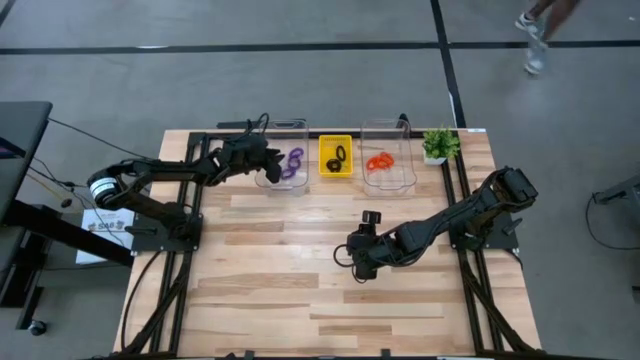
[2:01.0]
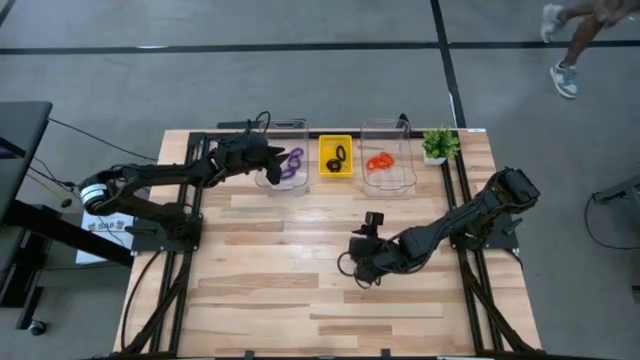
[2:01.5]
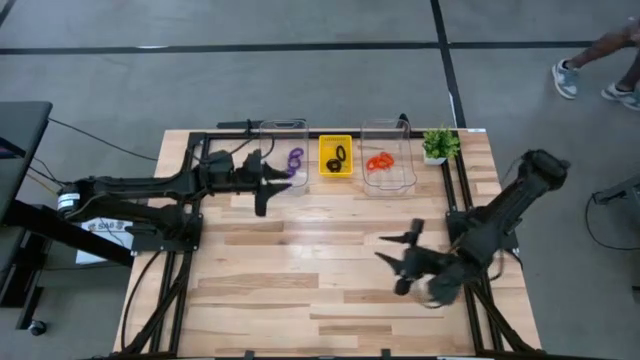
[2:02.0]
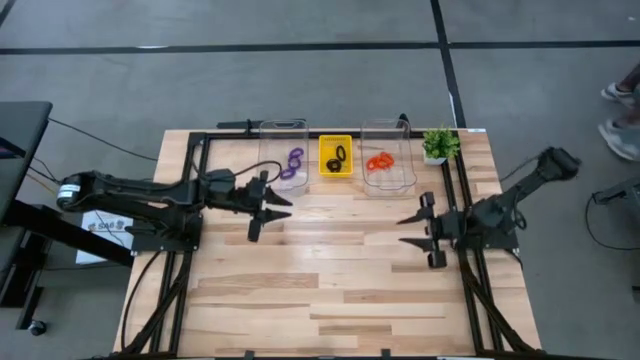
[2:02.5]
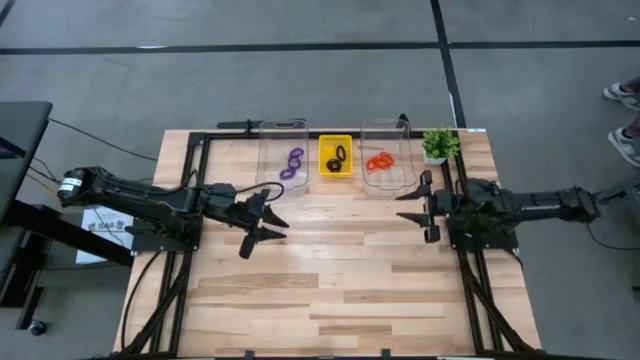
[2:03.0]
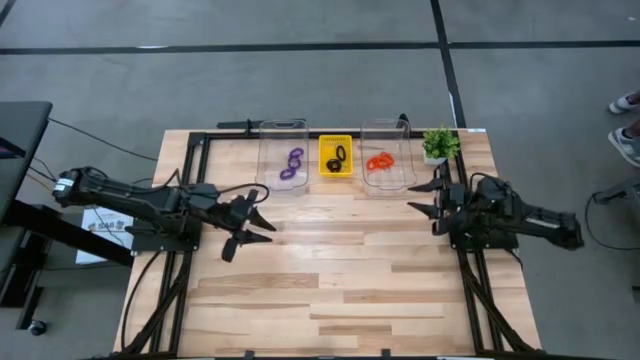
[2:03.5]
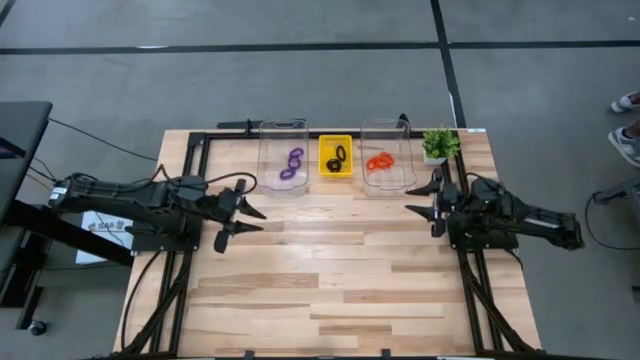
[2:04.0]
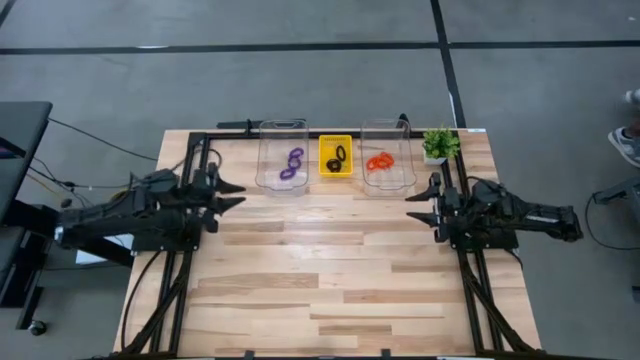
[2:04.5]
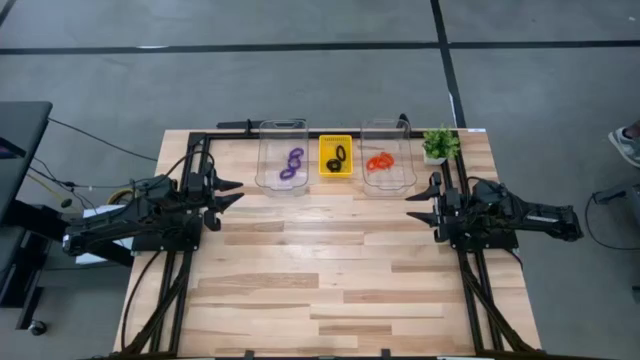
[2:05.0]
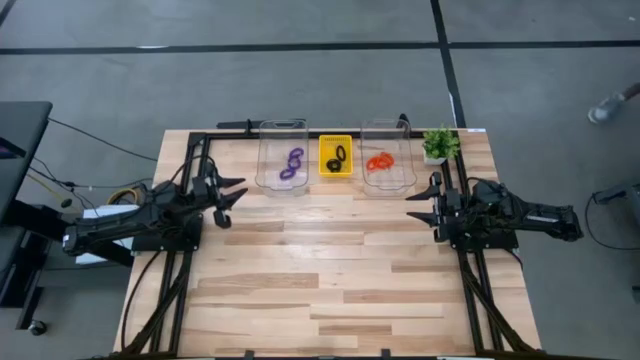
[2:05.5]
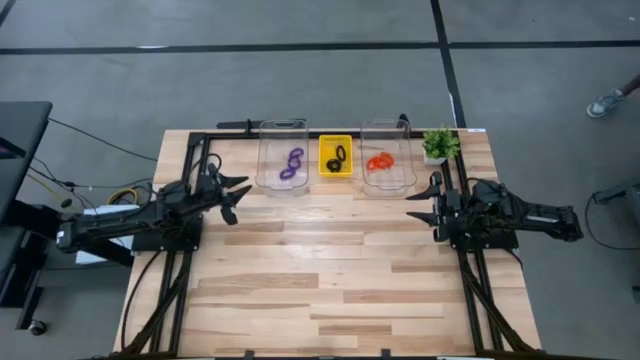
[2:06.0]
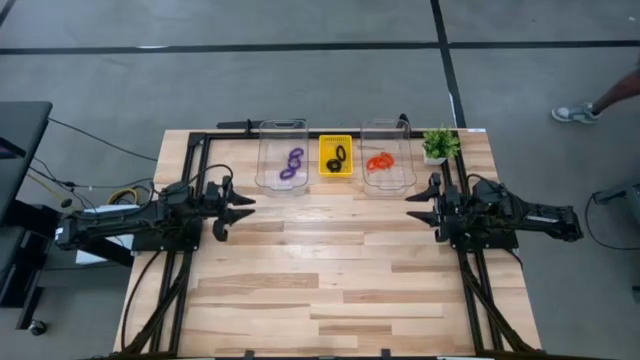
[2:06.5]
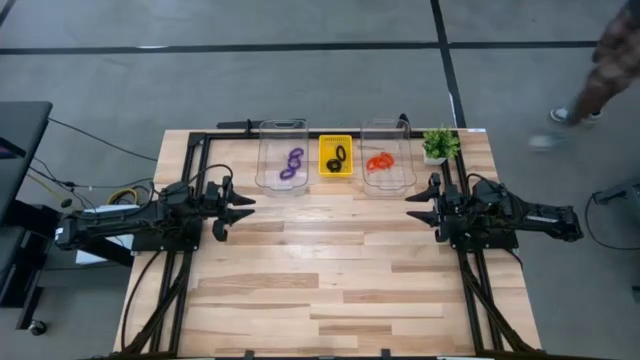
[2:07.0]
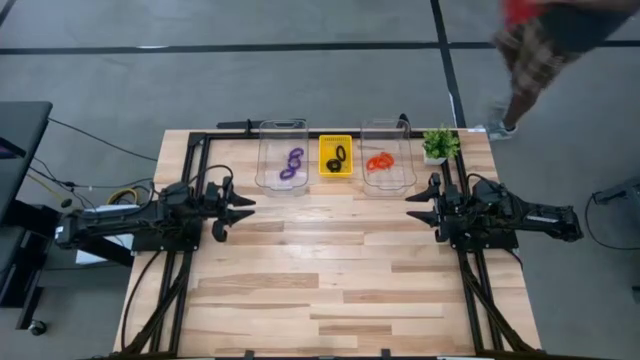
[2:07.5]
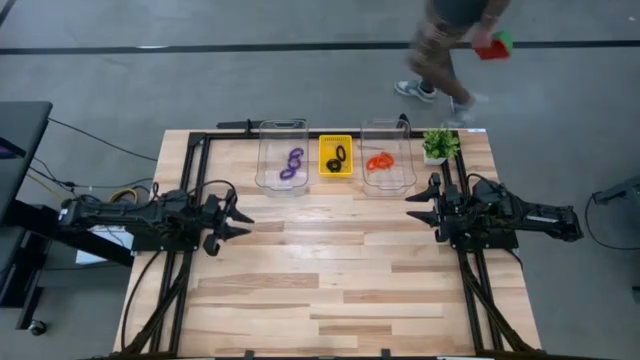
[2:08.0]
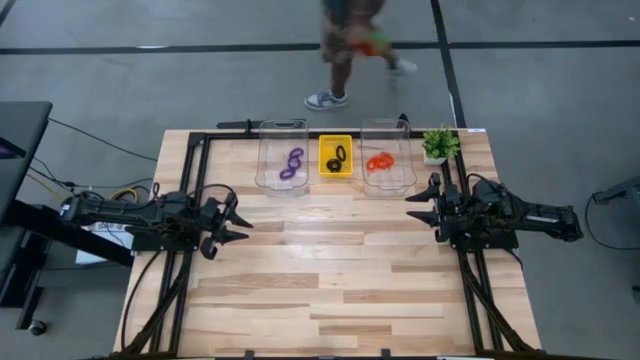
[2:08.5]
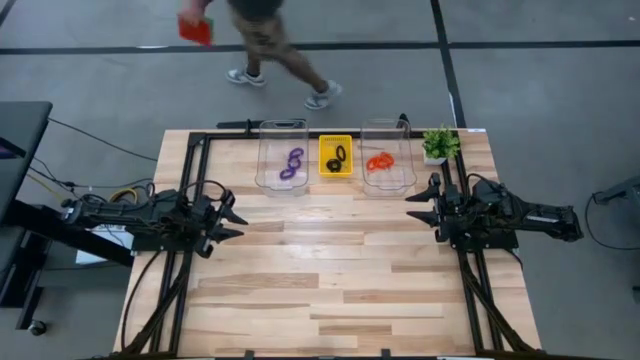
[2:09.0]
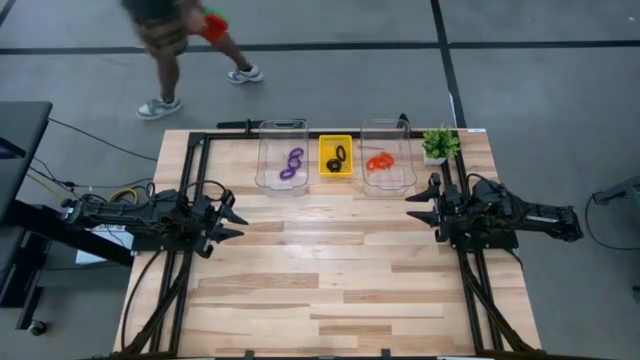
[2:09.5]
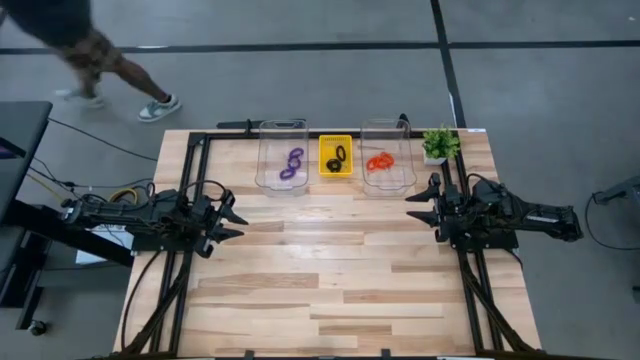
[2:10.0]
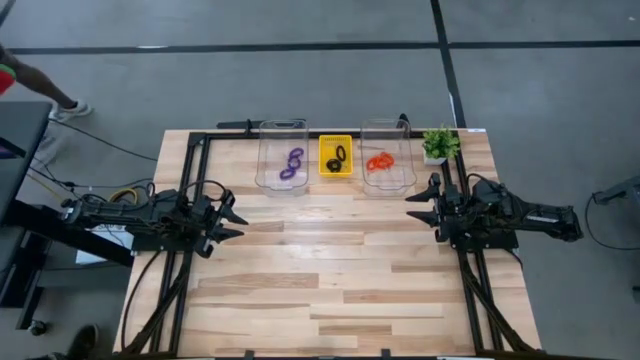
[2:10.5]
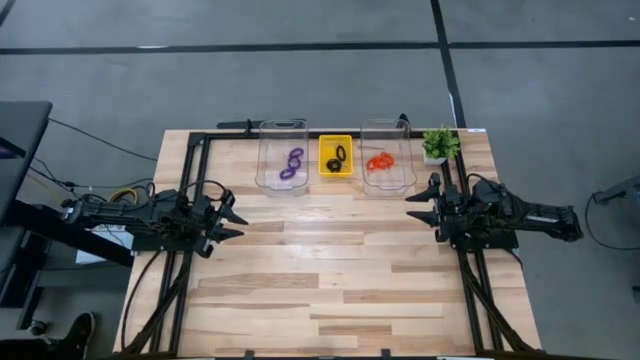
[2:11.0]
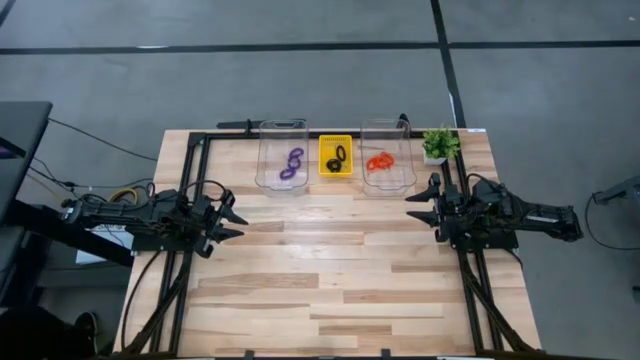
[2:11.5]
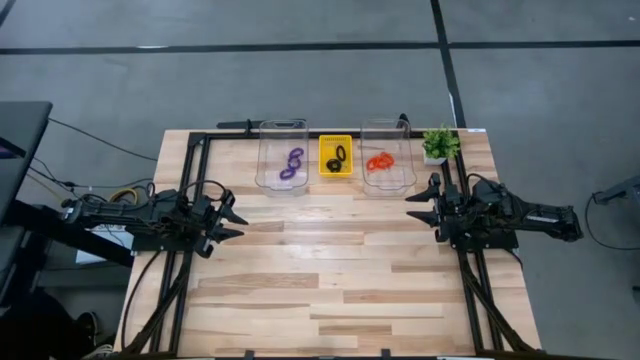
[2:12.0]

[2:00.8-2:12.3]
Task: Sort spring keychains
Return to Home Position

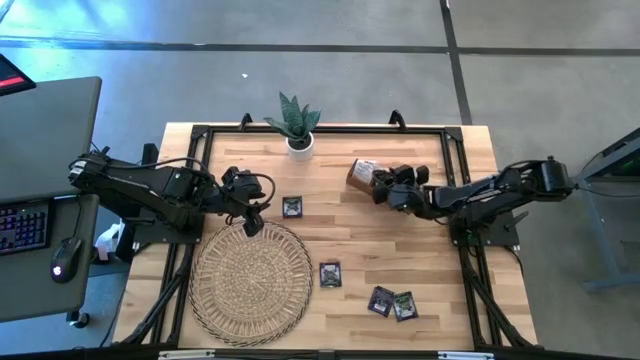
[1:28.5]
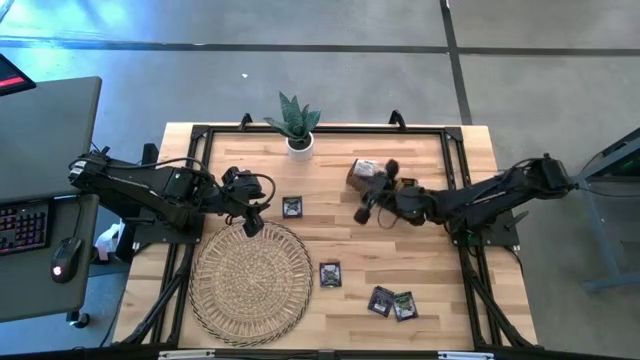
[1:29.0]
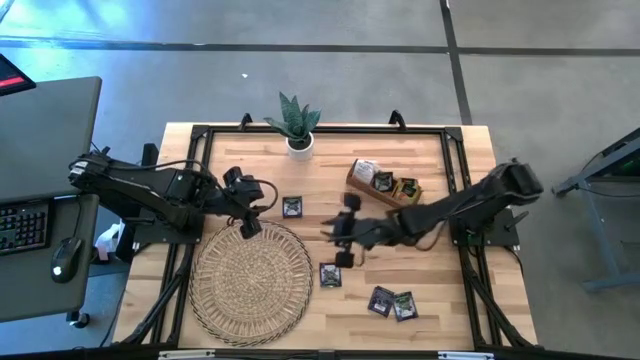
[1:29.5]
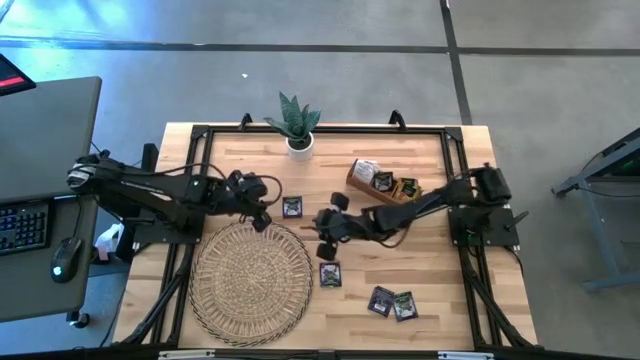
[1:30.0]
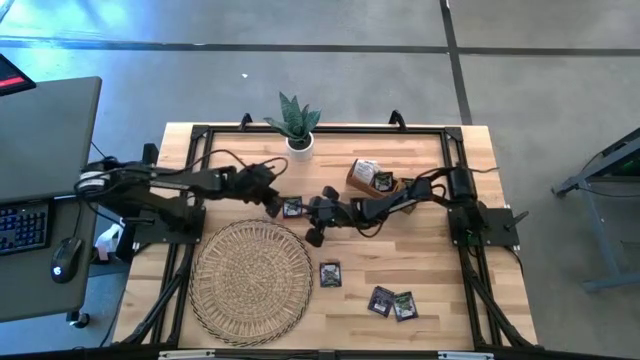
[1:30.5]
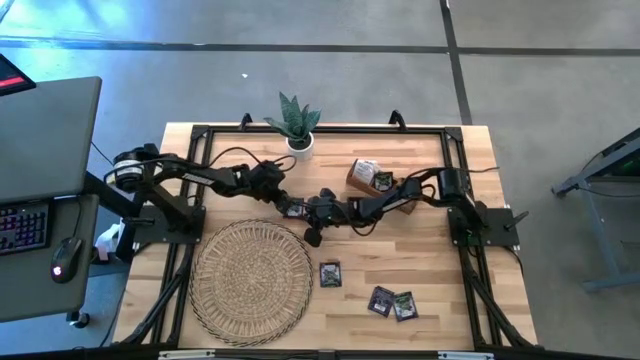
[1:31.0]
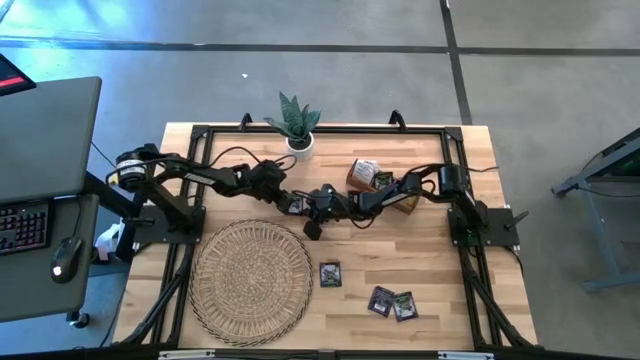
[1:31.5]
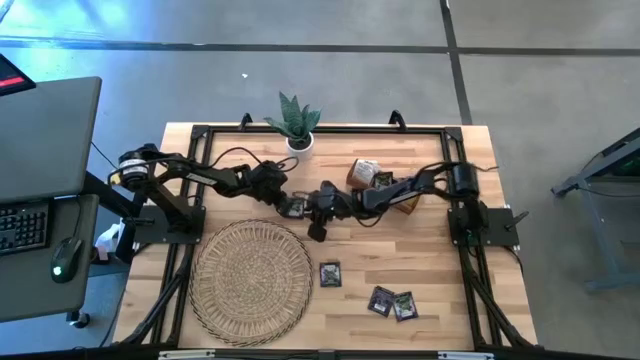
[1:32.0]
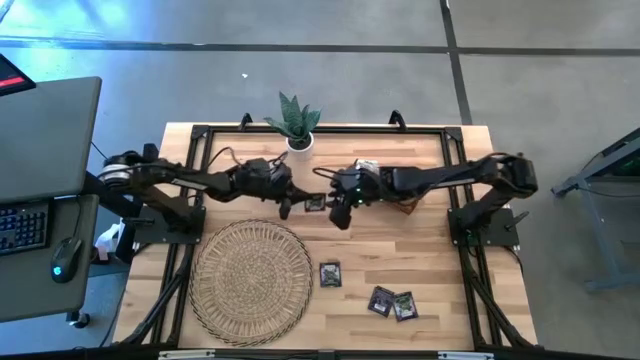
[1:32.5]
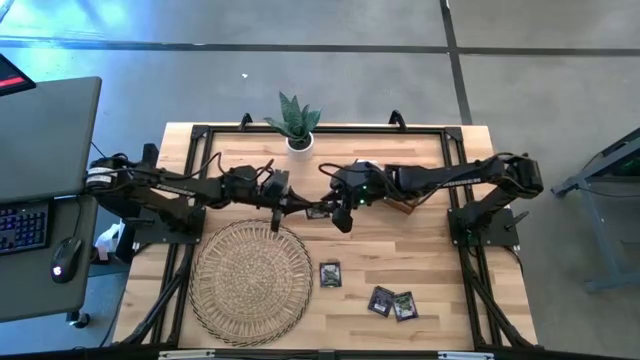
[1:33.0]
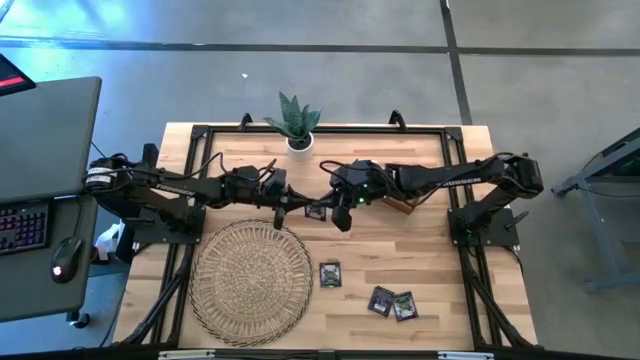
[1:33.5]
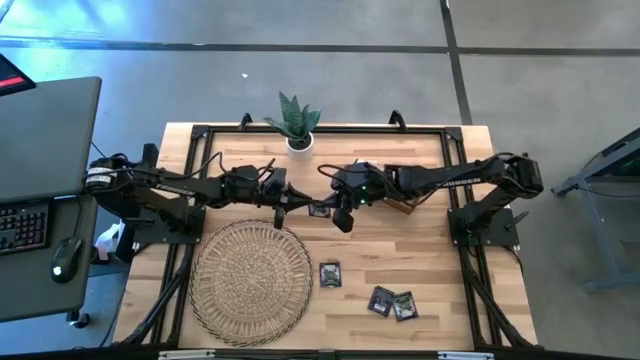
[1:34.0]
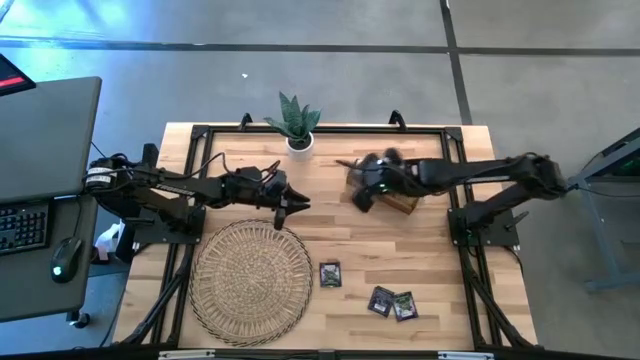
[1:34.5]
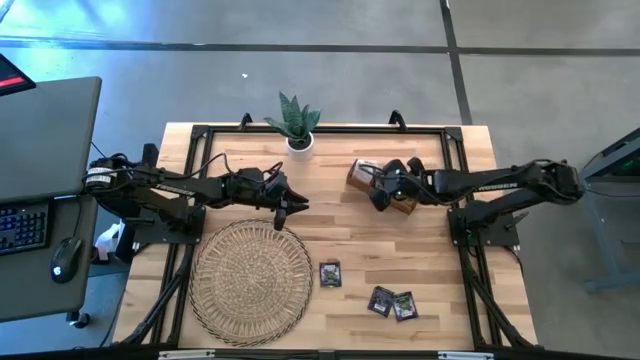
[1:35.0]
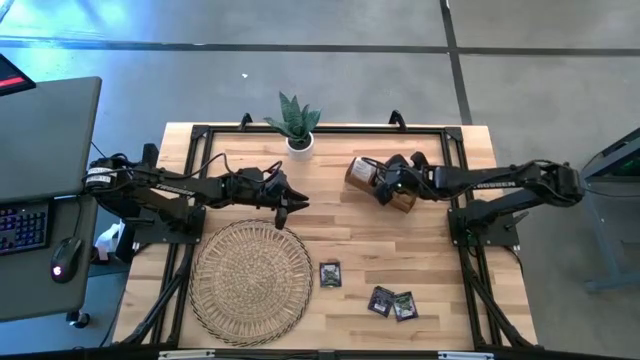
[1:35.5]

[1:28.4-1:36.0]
Task: Pick & Place Tea
Put the black tea bag into the middle section of the wooden organizer

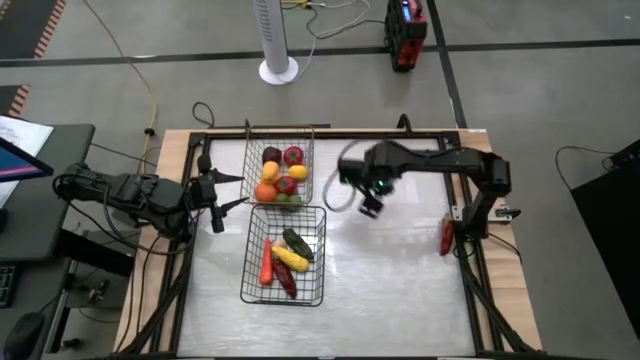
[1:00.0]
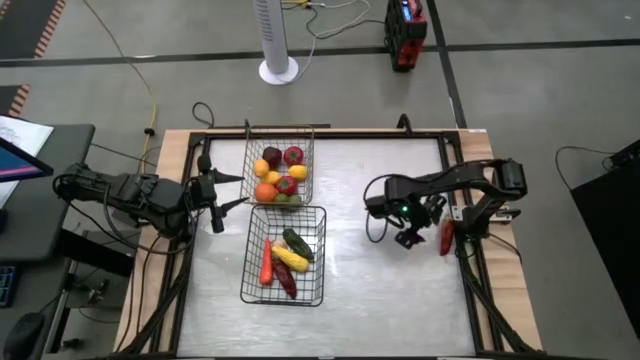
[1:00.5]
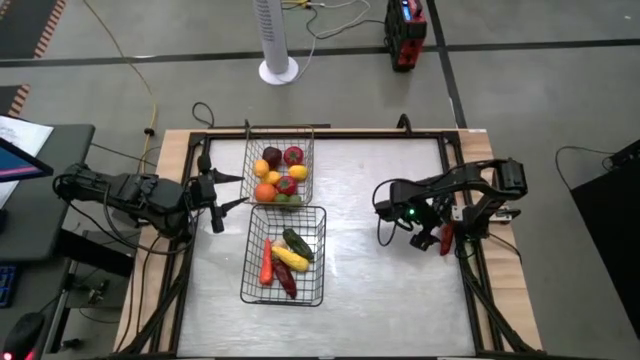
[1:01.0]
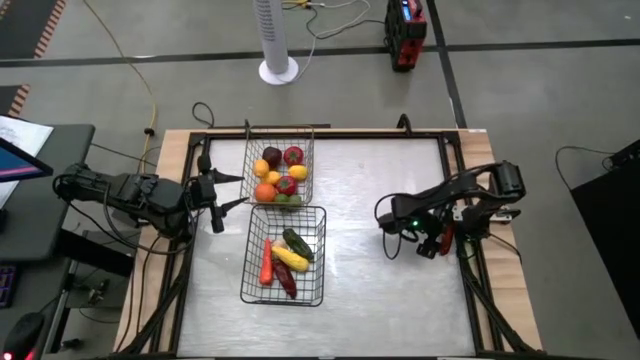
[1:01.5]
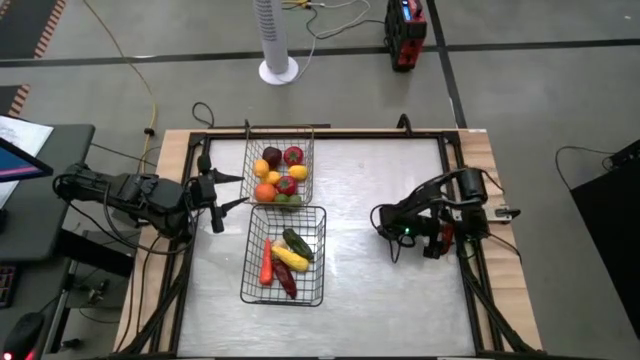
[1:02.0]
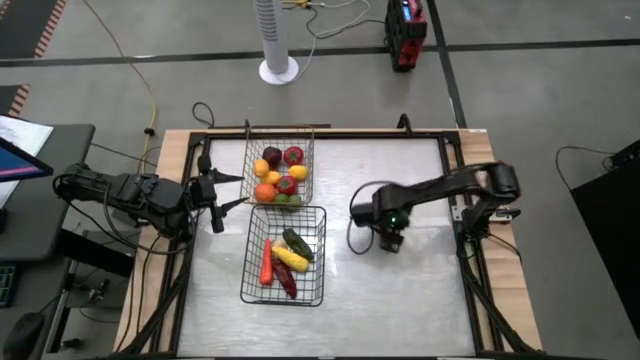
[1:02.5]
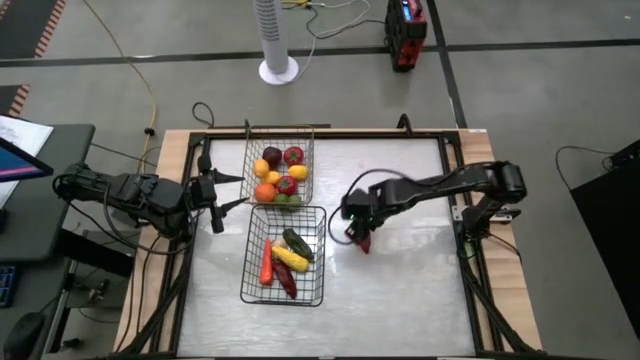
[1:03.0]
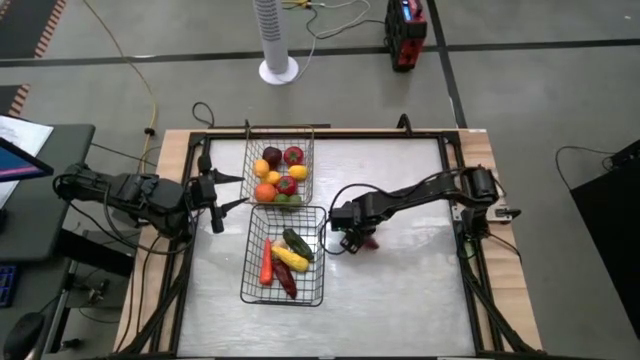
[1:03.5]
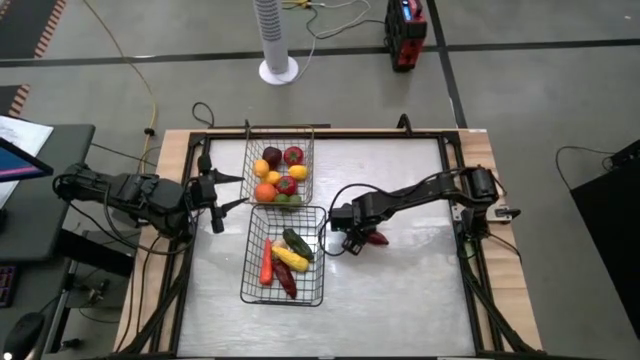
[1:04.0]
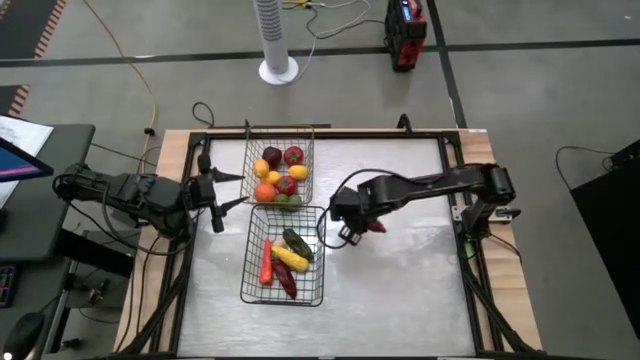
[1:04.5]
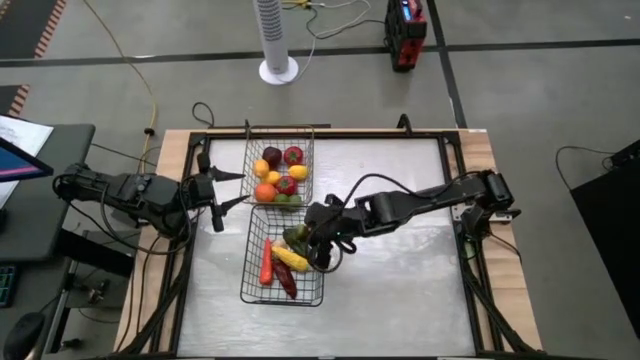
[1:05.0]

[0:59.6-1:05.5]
Task: Sort produce into baskets
Put the red chili pepper into the black wire basket
